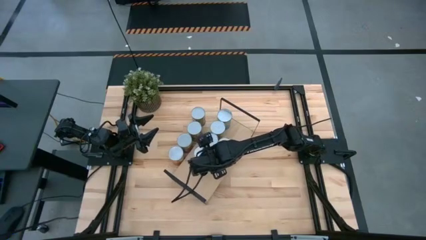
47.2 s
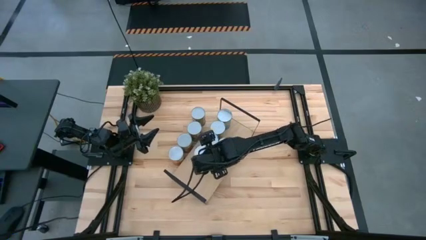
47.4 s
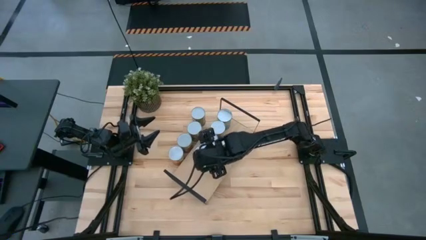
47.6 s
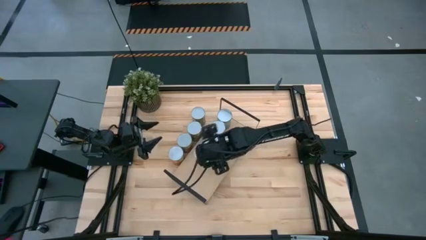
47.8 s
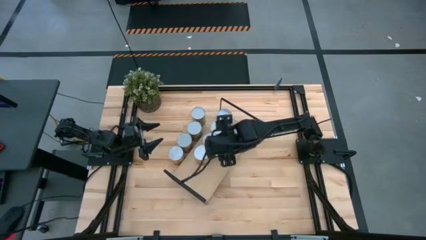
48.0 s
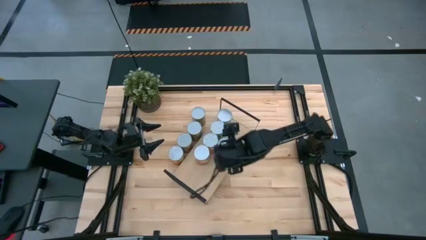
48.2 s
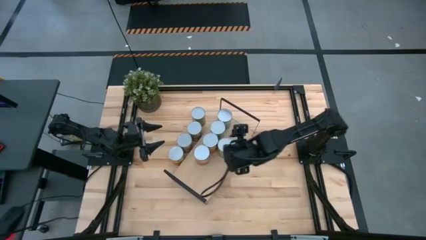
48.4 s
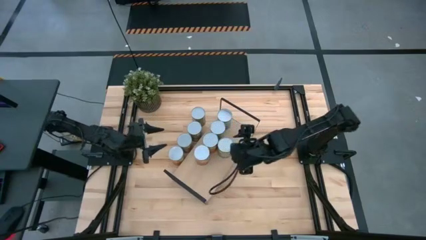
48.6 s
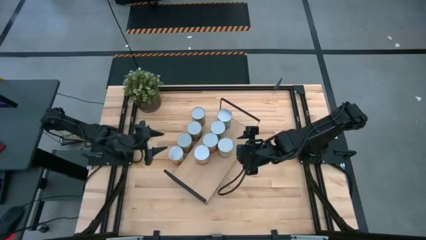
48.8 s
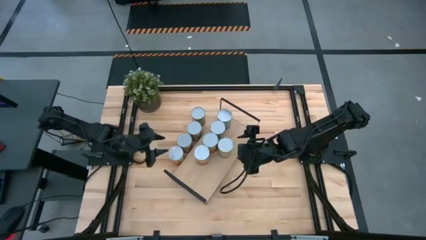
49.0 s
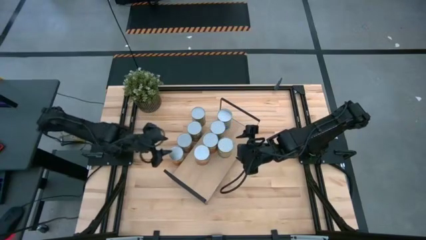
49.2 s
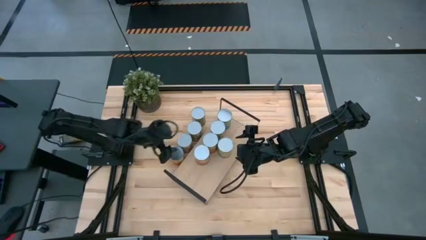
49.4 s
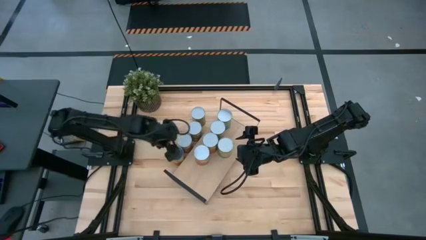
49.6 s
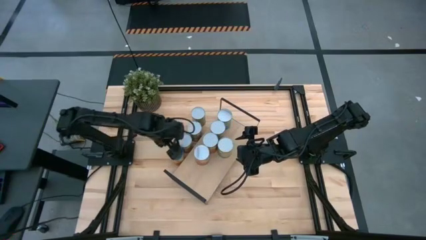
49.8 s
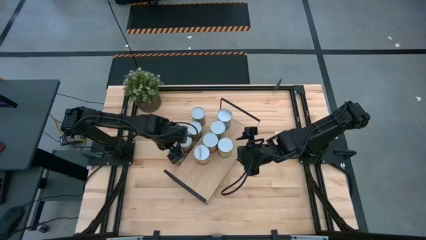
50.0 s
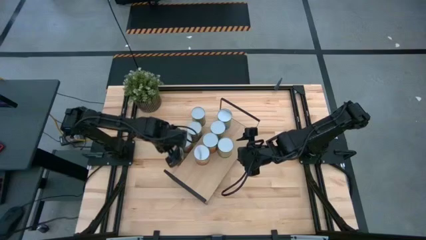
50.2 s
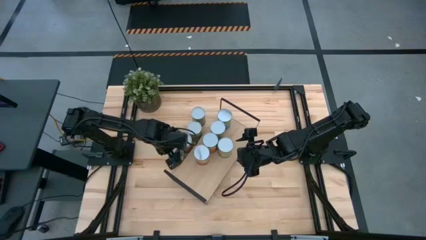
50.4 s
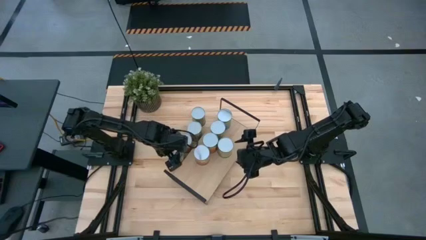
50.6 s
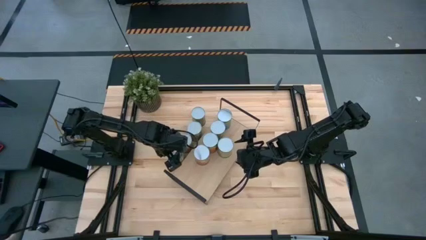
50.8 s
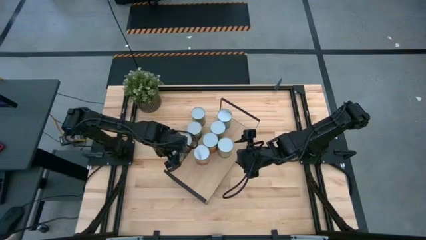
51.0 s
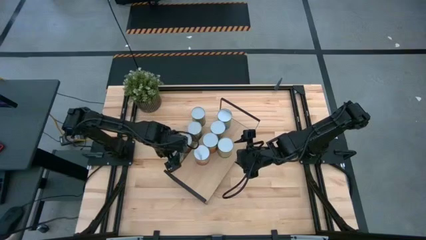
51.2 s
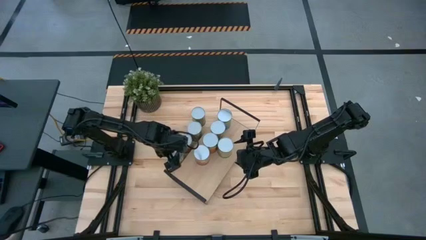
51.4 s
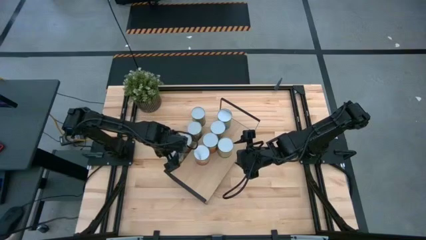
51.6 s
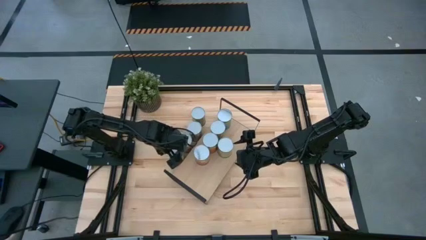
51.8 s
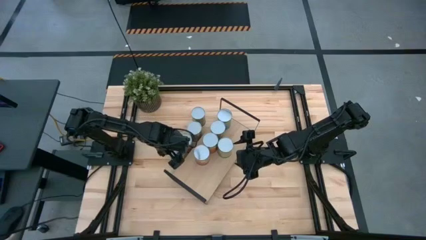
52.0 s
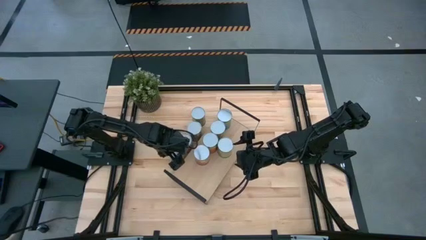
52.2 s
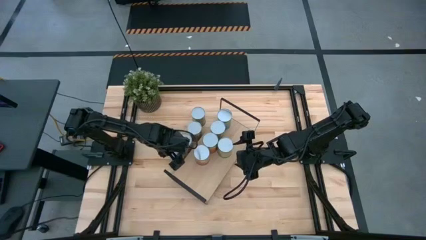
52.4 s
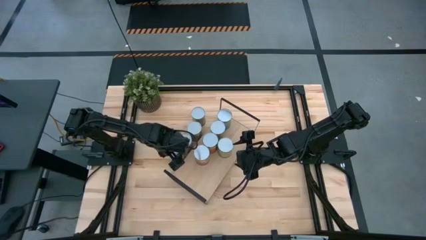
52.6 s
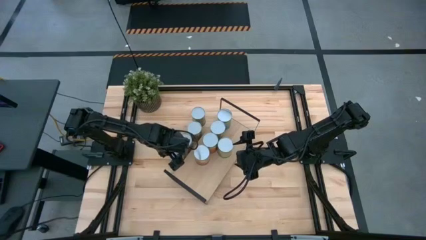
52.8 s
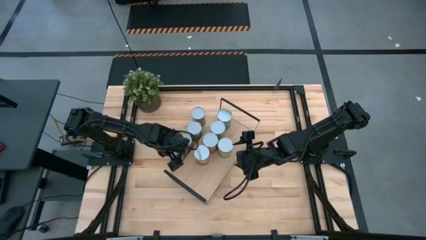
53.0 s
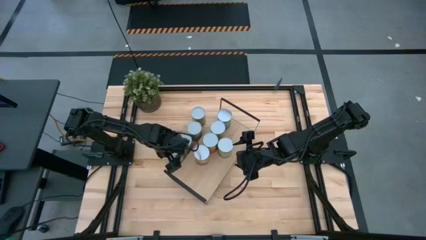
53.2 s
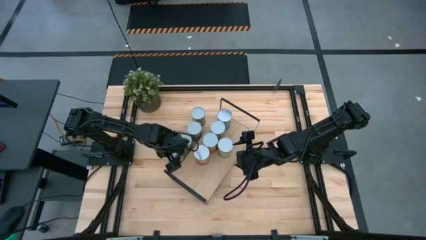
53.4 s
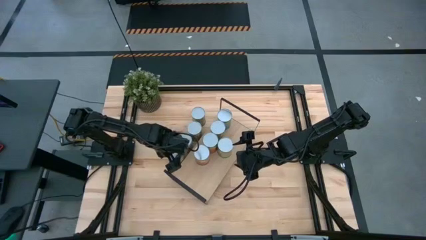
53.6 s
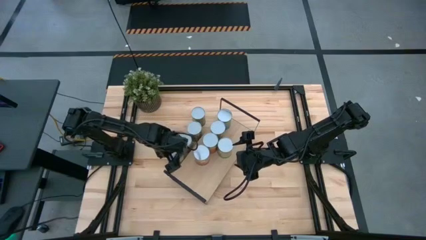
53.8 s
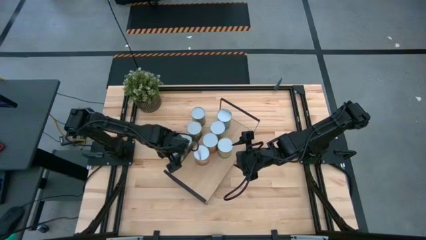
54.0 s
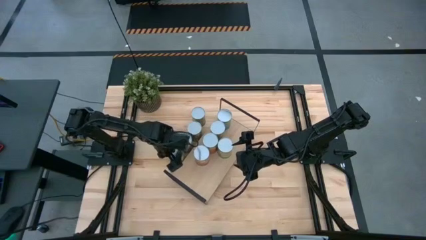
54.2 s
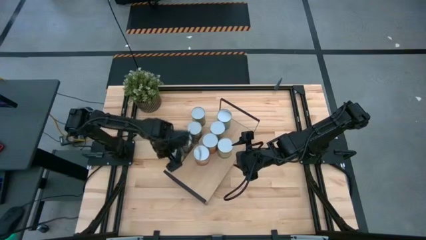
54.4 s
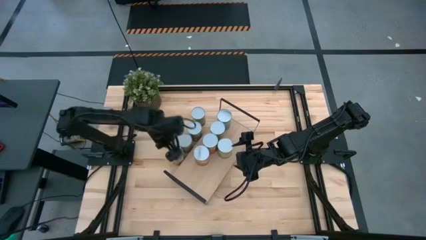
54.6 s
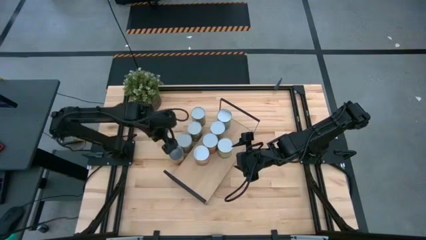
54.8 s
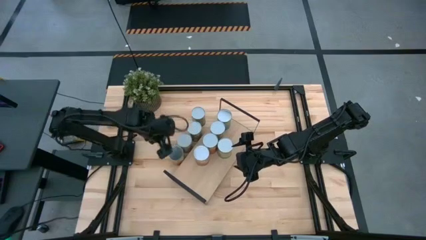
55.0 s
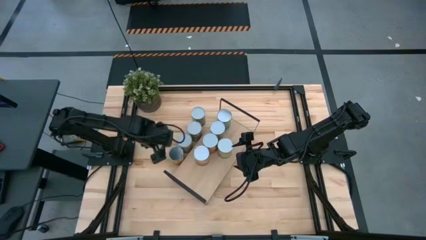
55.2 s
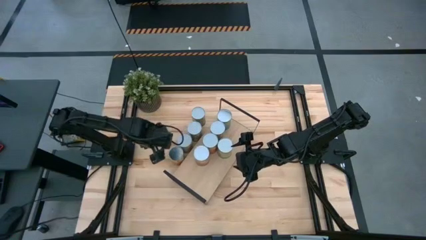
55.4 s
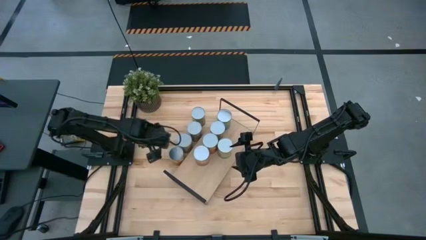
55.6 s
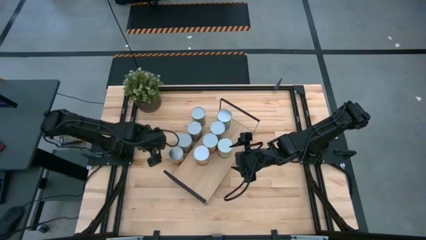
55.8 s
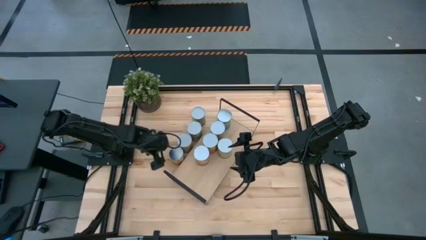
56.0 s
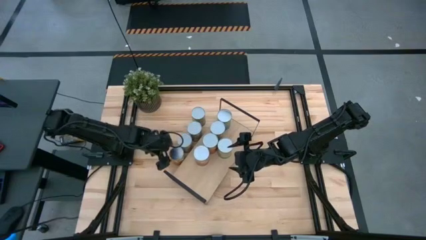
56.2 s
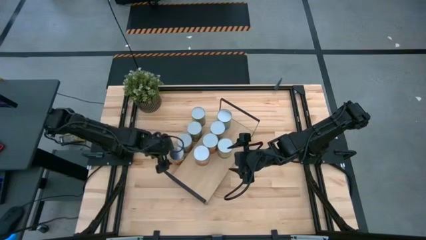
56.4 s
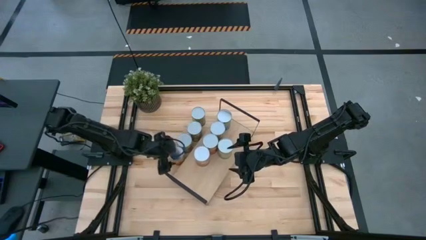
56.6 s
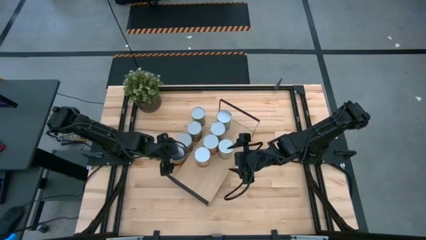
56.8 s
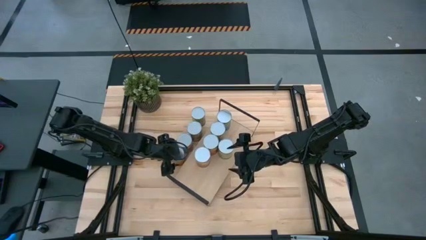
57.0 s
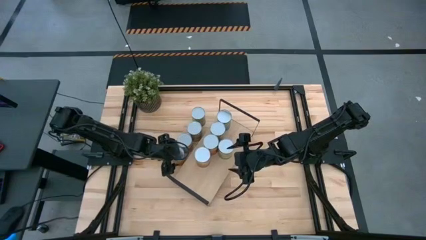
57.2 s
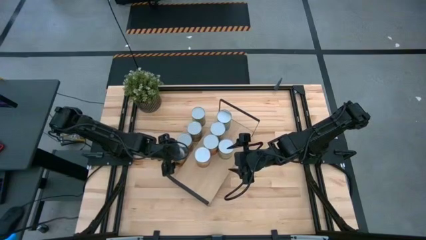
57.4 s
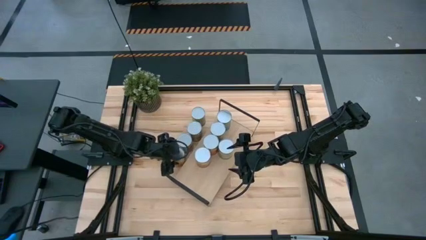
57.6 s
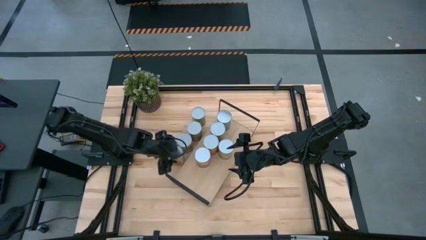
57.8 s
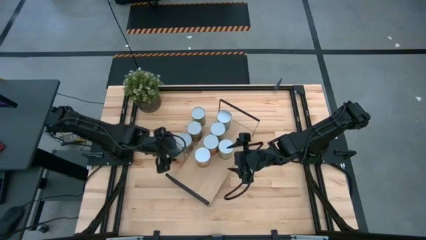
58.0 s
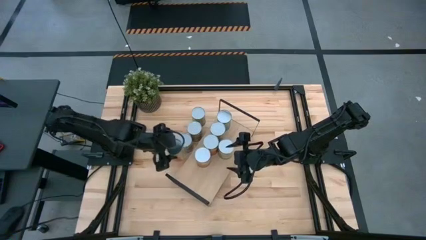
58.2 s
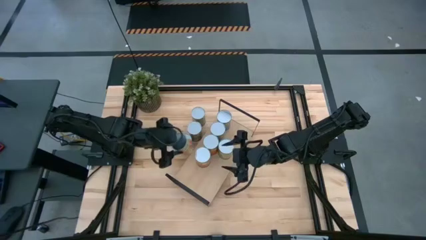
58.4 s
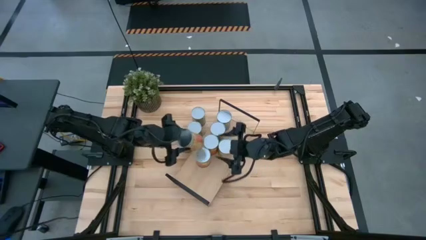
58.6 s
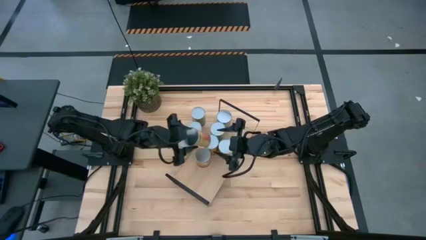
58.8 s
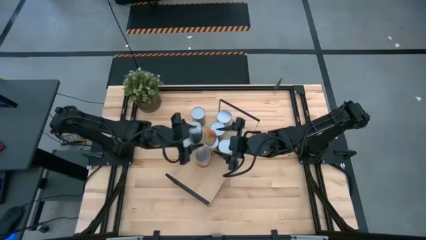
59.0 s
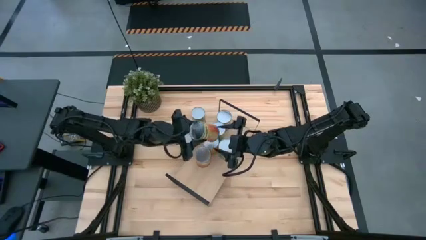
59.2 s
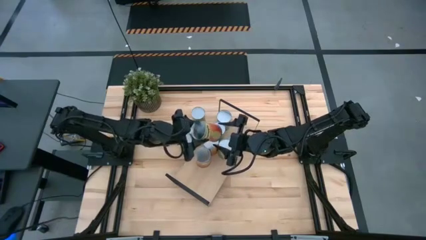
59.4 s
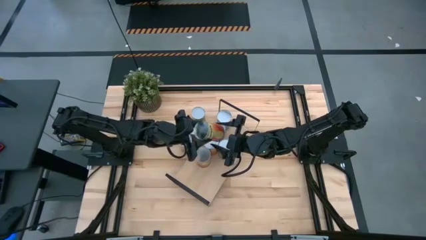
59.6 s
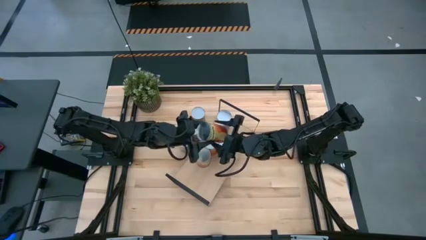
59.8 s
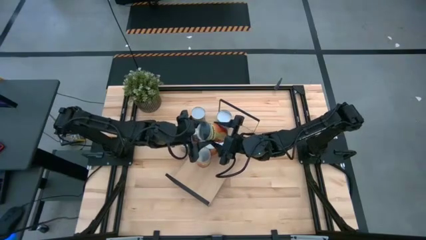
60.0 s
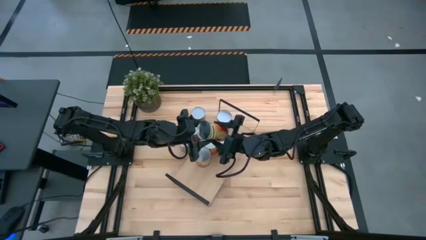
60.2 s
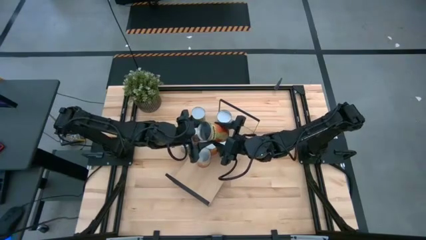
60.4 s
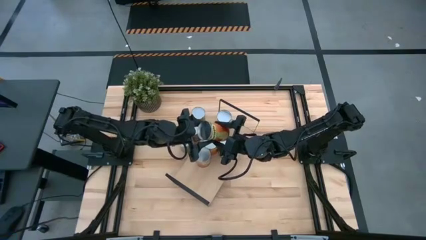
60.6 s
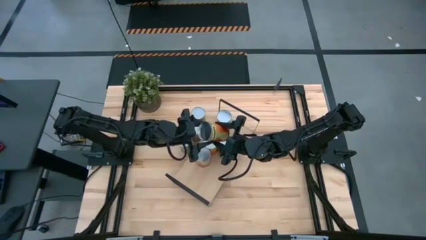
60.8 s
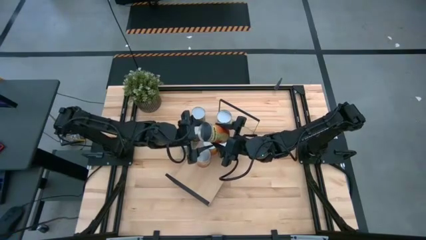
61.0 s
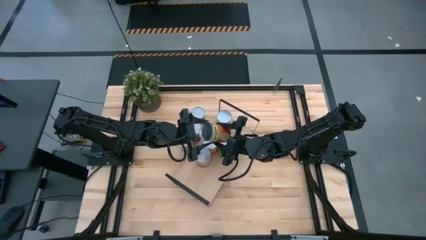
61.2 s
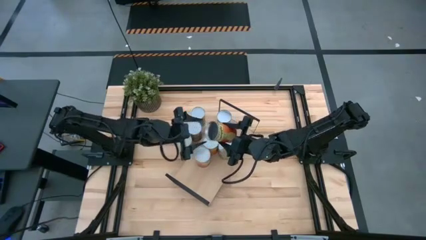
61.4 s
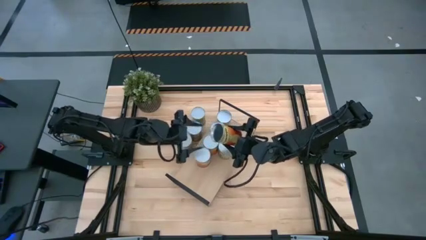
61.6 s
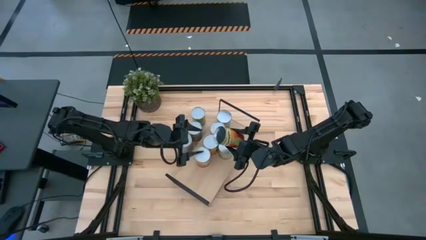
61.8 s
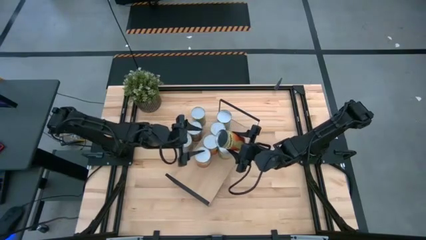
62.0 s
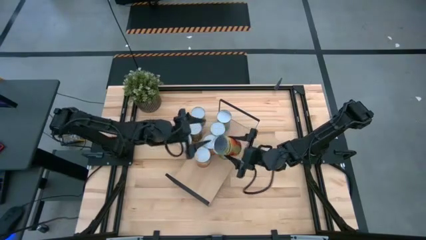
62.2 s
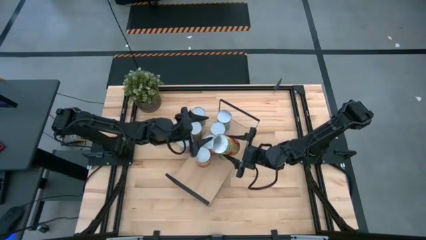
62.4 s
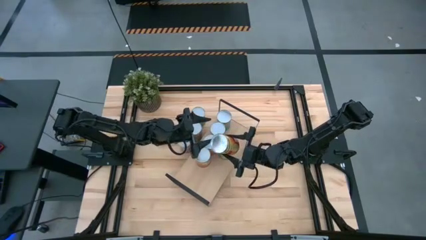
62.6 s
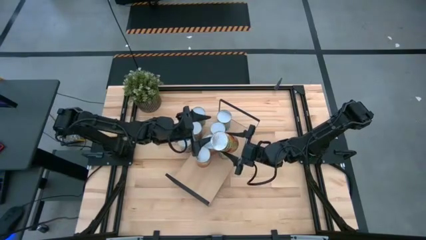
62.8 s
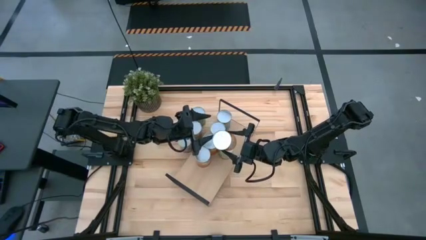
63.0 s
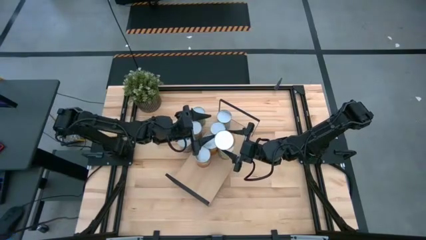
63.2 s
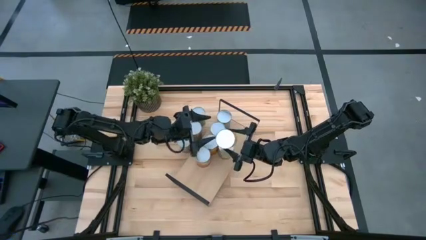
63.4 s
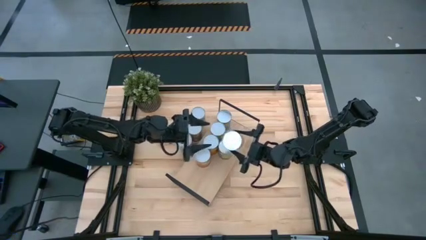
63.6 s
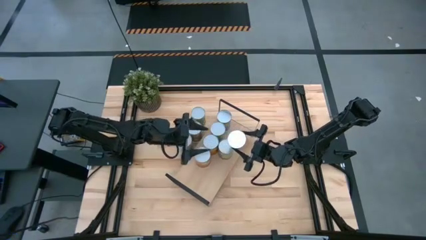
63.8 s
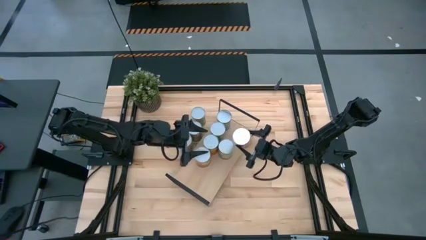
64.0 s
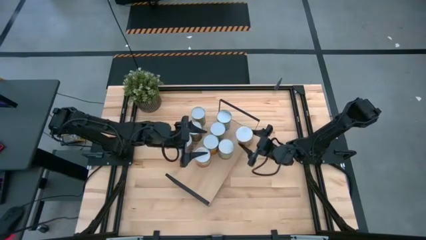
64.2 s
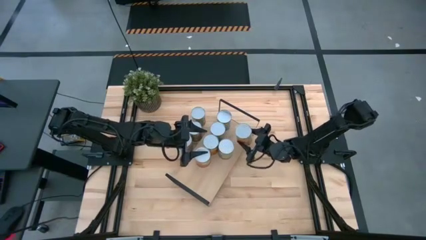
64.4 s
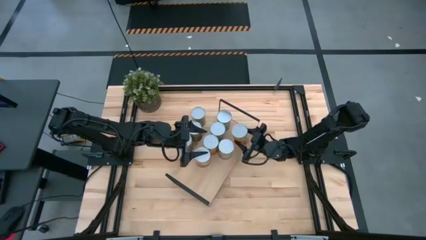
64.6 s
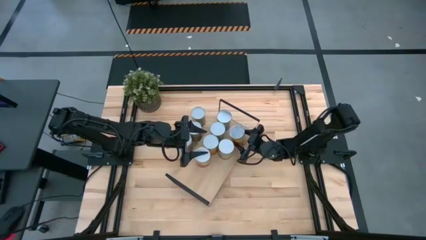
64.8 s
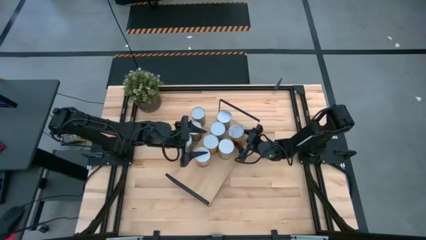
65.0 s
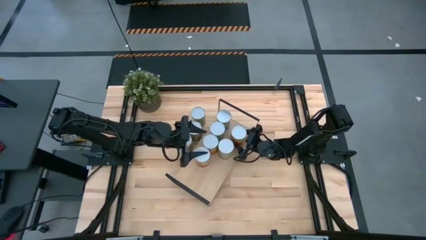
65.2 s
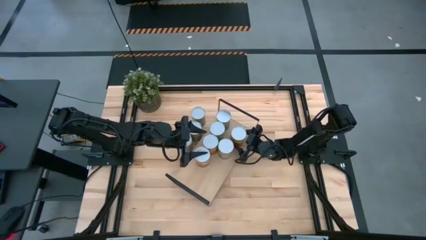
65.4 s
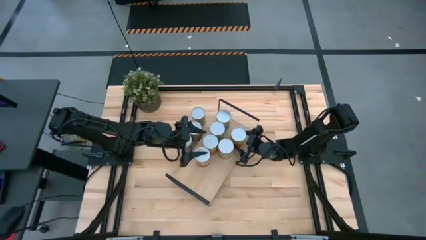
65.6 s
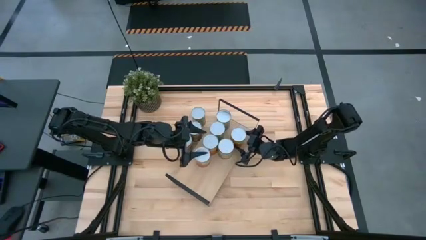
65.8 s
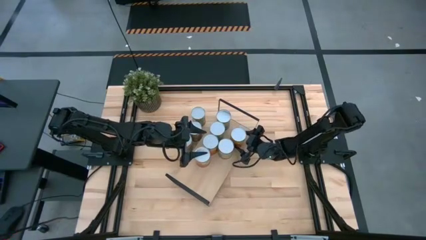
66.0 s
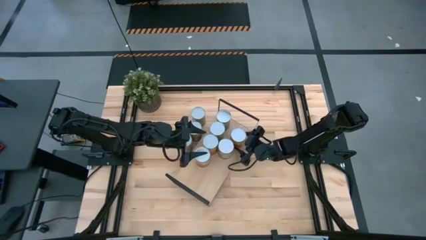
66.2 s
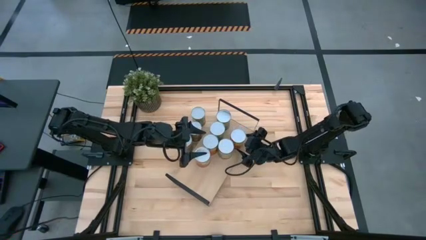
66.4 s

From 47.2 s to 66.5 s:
Task: Pick and place cans onto a shelf
Put the left canned pineapple on the shelf
